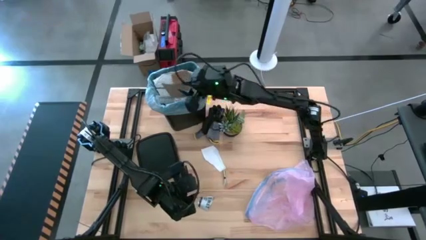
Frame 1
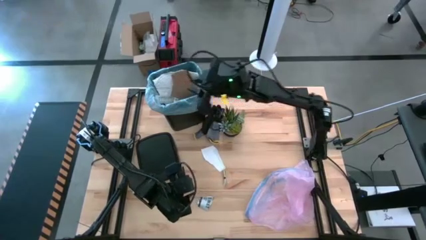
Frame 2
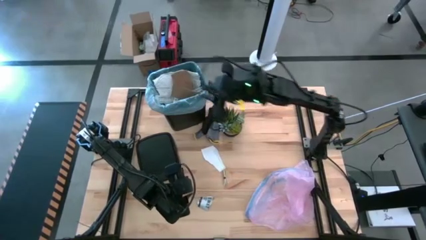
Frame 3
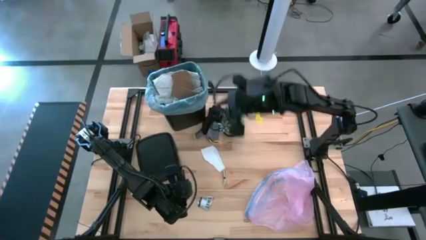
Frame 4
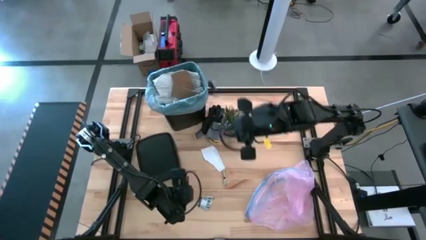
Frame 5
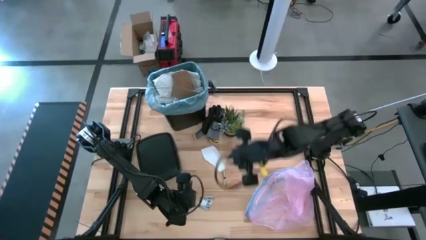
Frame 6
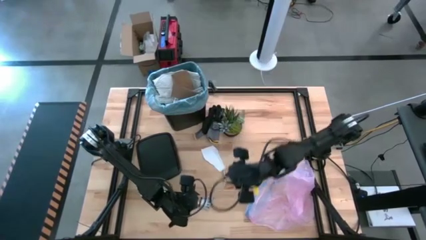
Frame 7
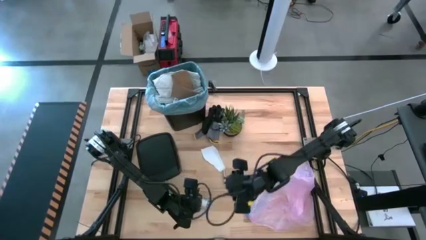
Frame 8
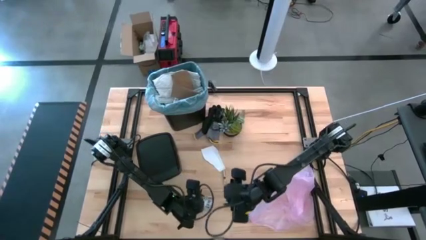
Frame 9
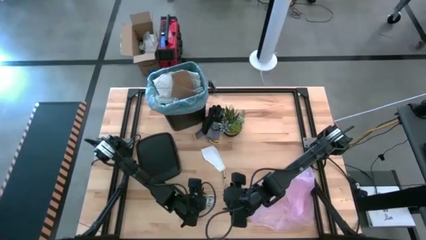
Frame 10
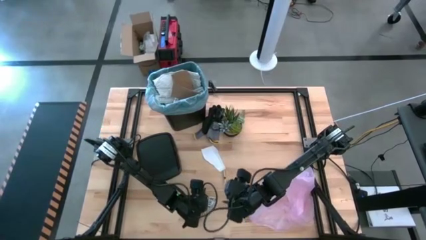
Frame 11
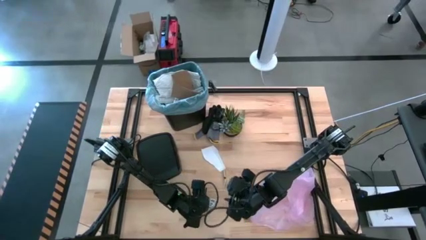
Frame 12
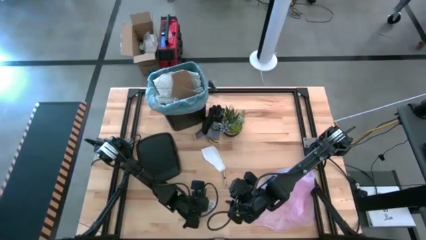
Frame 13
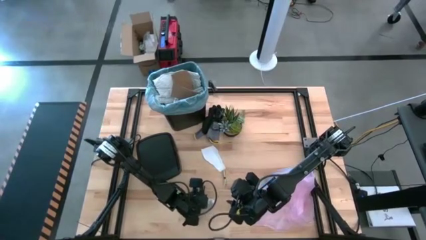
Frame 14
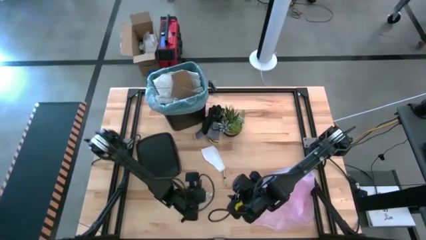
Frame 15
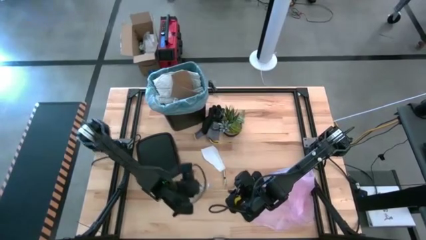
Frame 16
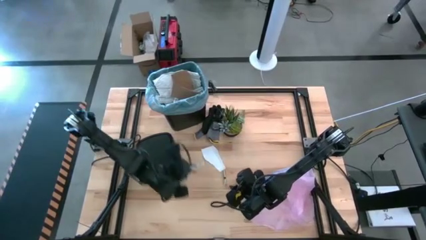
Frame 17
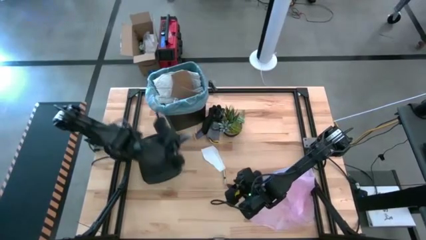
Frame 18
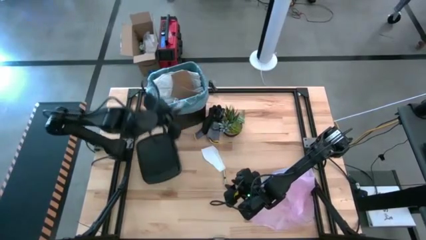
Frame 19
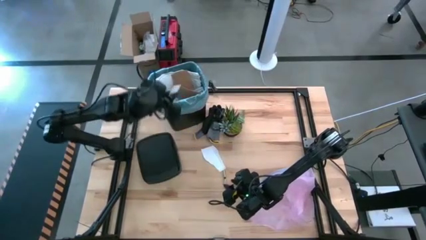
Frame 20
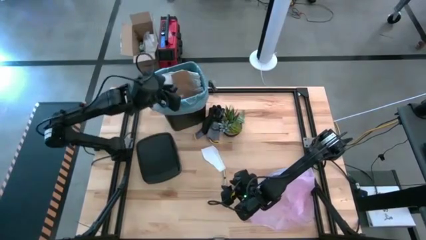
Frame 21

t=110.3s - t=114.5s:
Task: place trash/remove bag and relplace
Put the white paper into the trash bin

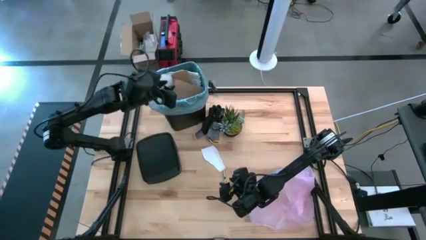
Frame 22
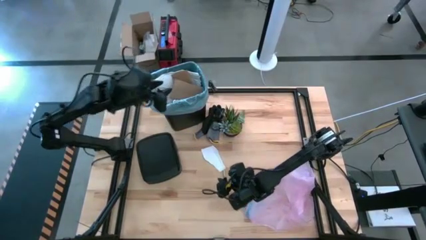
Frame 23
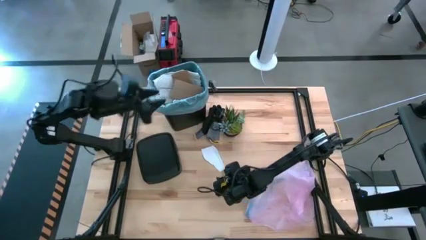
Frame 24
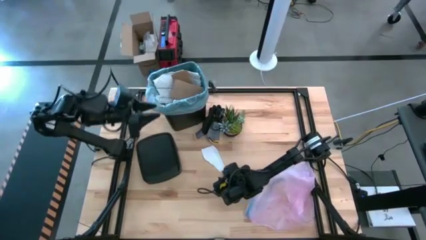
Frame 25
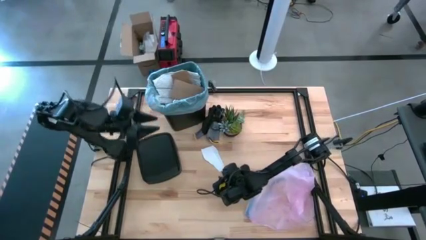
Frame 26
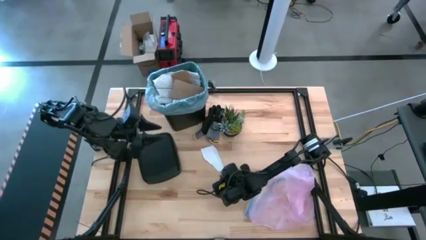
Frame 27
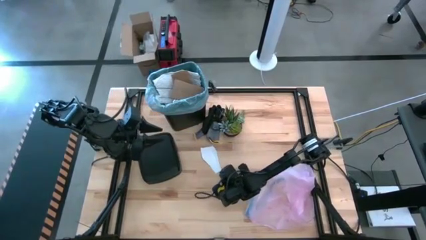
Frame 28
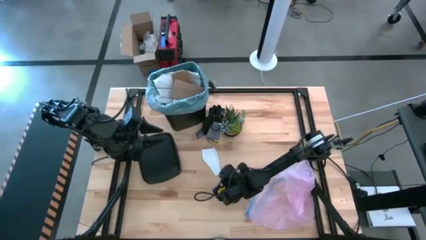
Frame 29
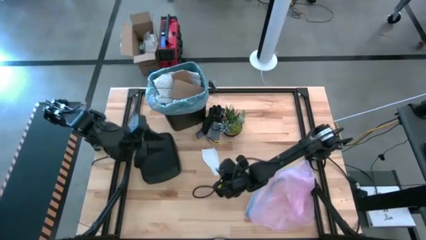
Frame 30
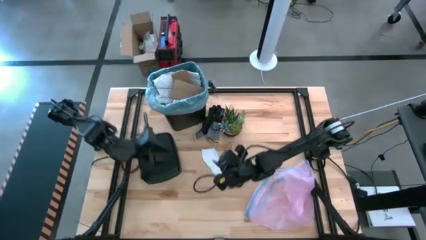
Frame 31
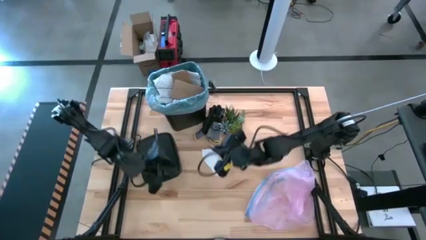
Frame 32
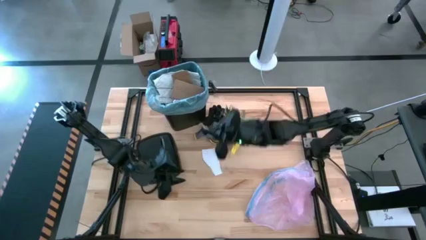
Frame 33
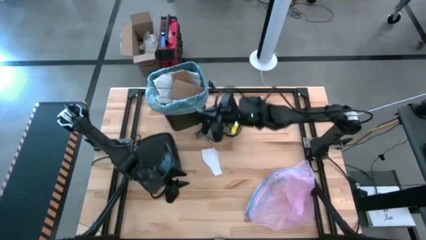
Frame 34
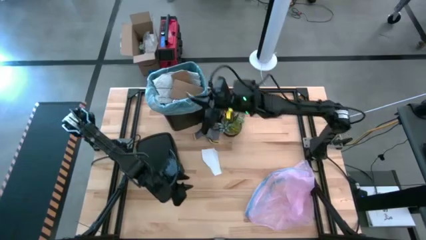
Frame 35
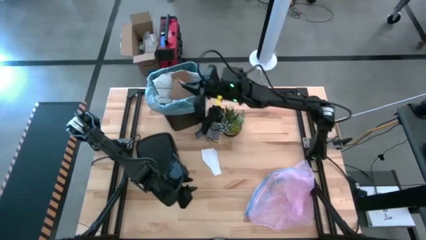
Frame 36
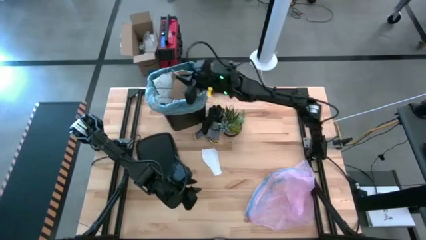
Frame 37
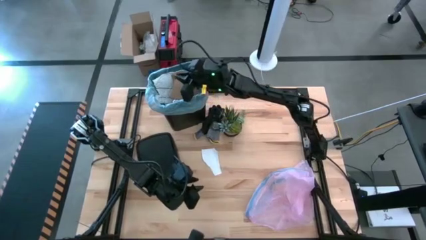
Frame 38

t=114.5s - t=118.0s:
Put the different-color zip-tied cables into the trash bin

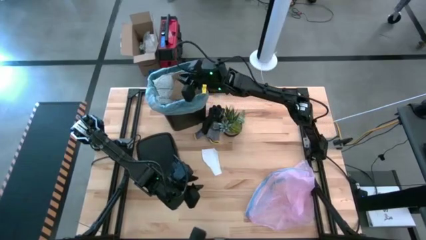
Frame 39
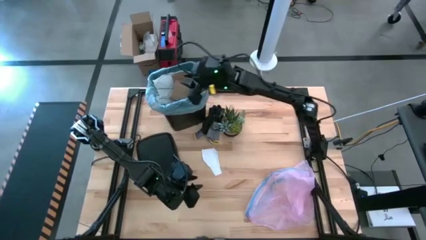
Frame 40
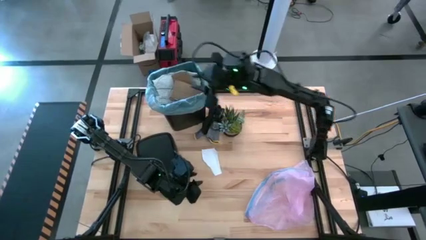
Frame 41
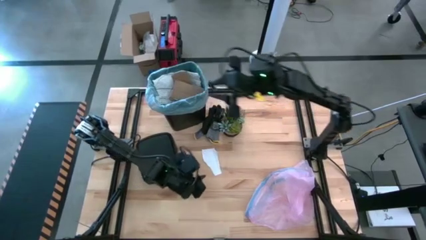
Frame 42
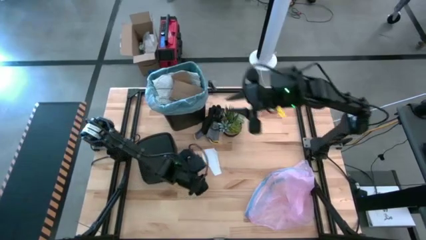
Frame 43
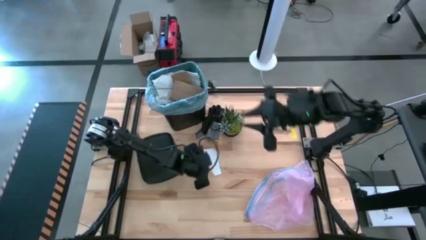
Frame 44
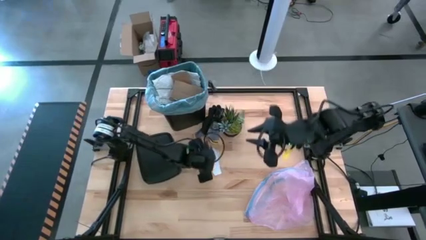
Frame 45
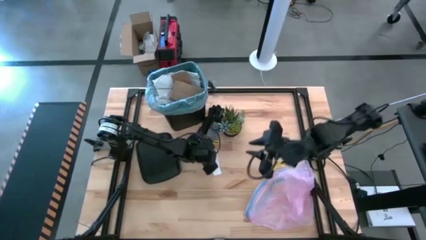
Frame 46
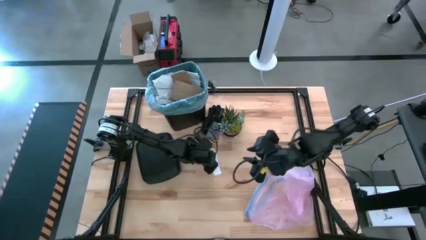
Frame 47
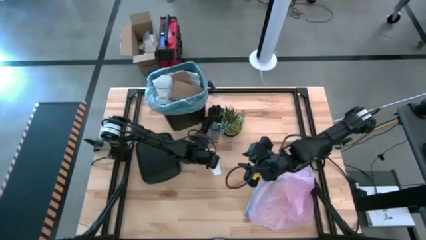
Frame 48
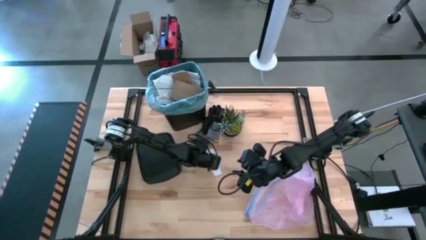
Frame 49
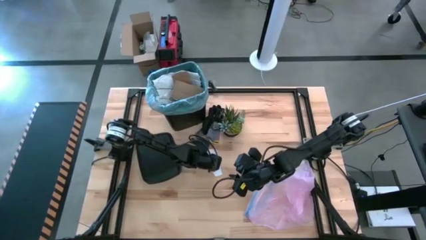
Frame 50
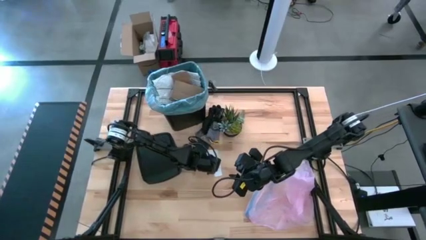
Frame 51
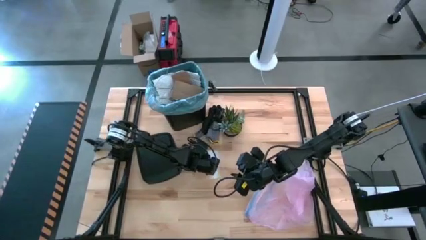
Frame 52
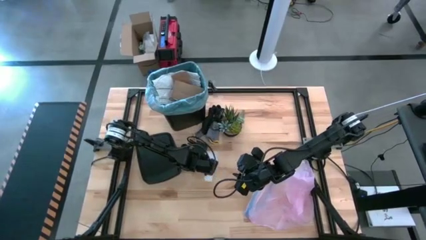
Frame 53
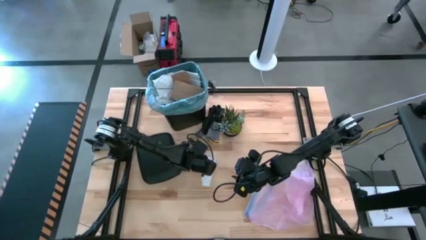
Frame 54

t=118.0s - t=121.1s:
Put the white paper into the trash bin

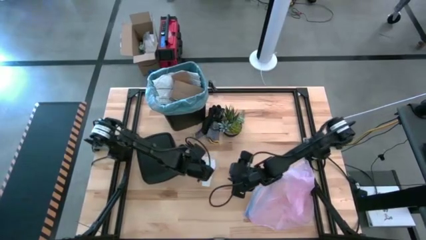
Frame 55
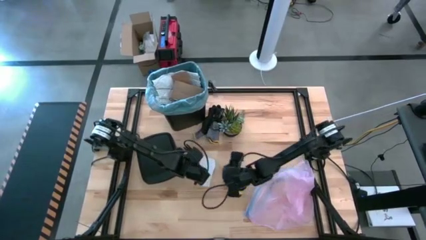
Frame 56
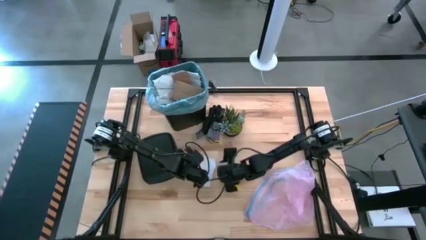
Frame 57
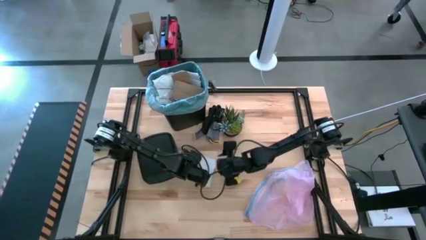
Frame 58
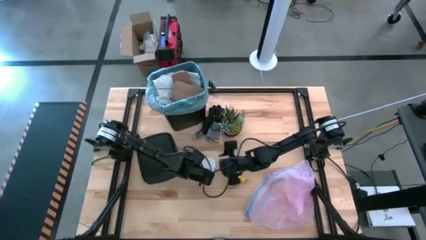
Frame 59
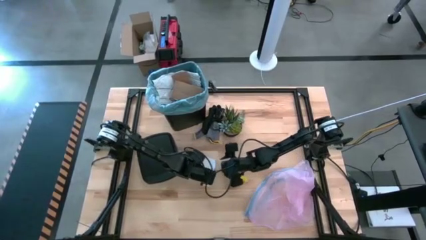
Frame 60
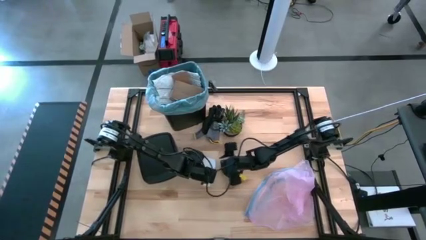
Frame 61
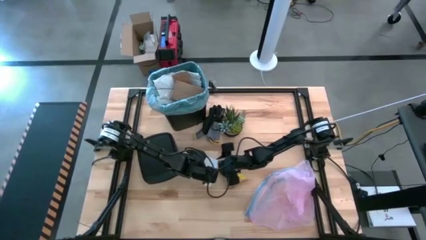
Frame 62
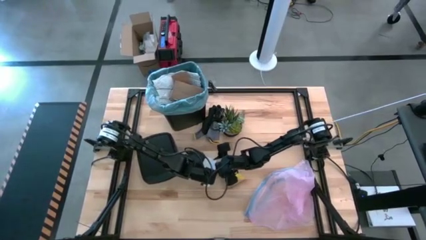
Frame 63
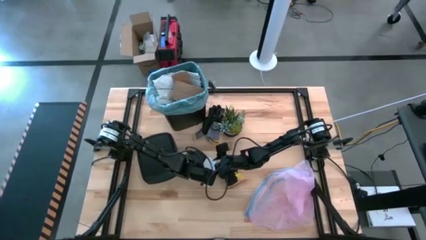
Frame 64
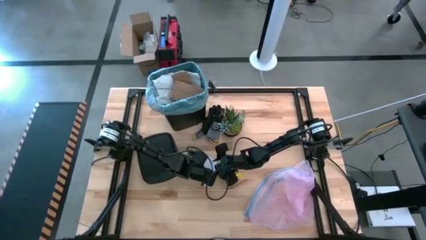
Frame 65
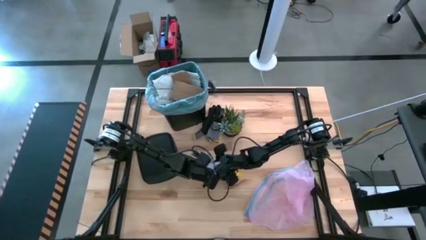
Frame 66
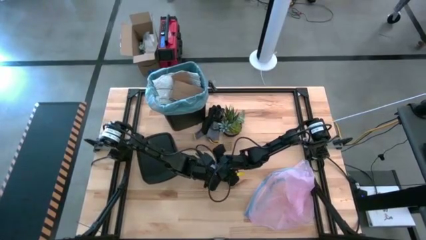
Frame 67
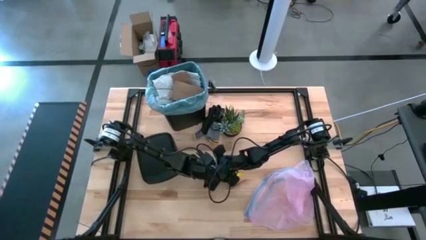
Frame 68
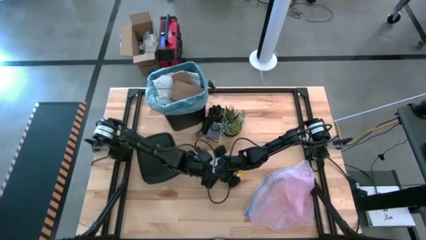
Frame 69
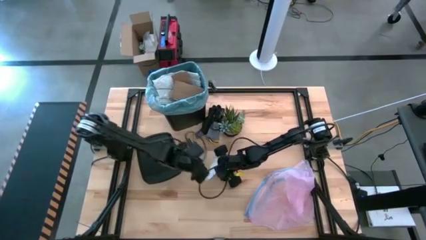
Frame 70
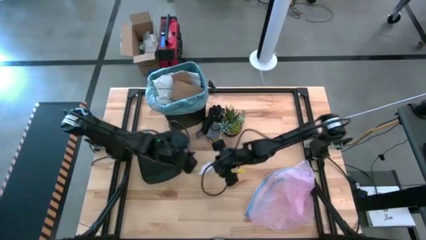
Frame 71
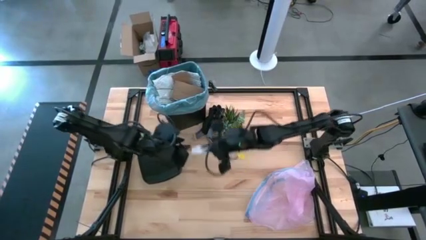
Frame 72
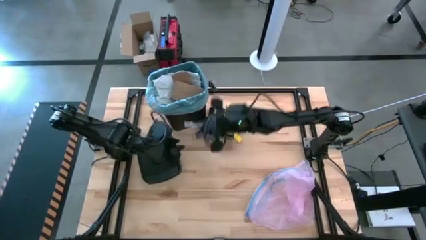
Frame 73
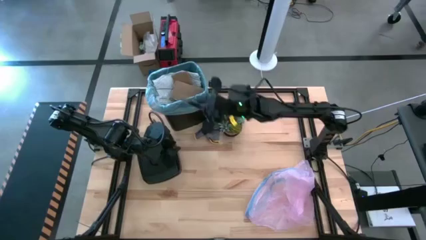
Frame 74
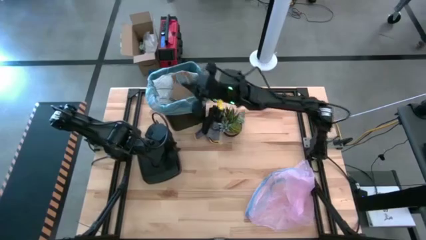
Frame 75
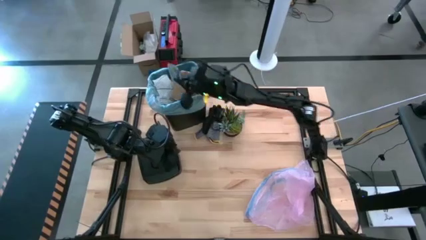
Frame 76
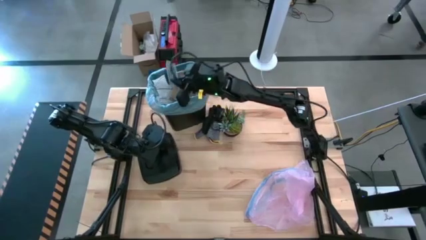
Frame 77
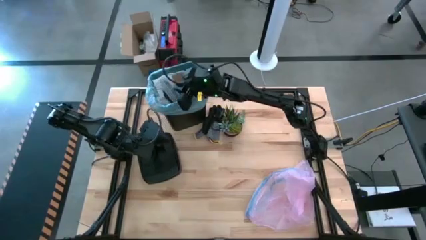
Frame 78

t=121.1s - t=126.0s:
Put the white paper into the trash bin
